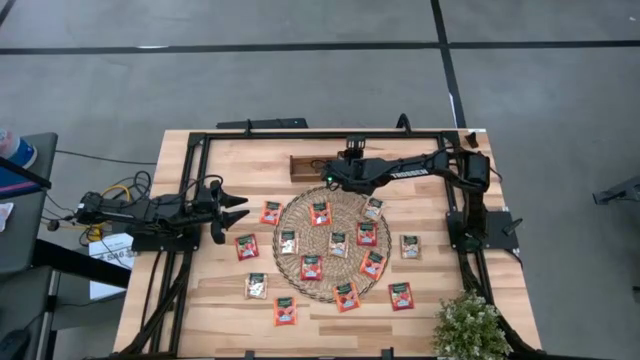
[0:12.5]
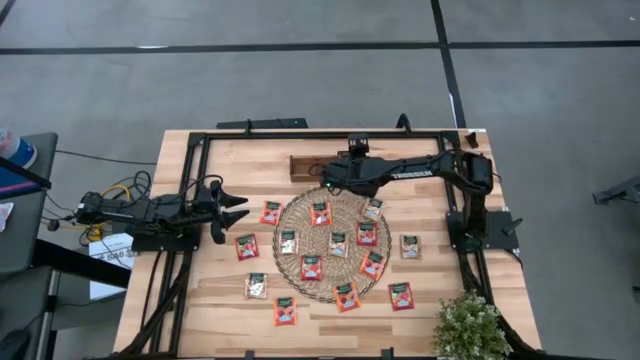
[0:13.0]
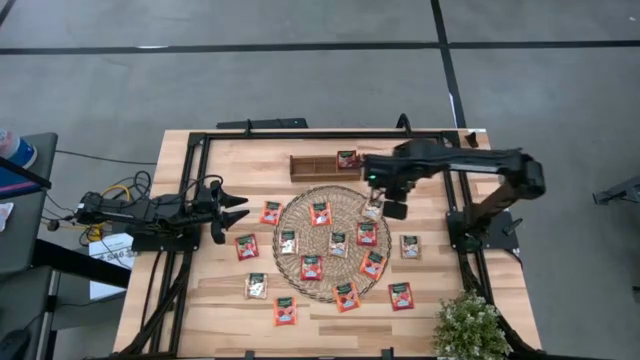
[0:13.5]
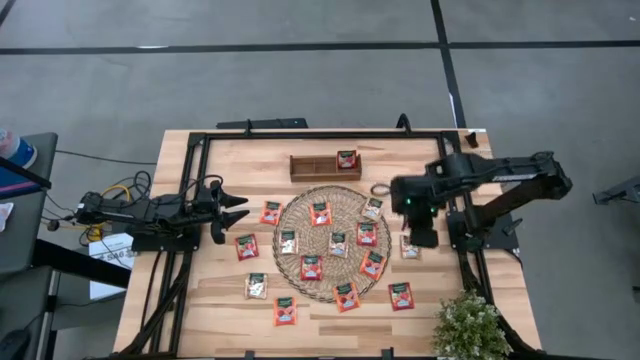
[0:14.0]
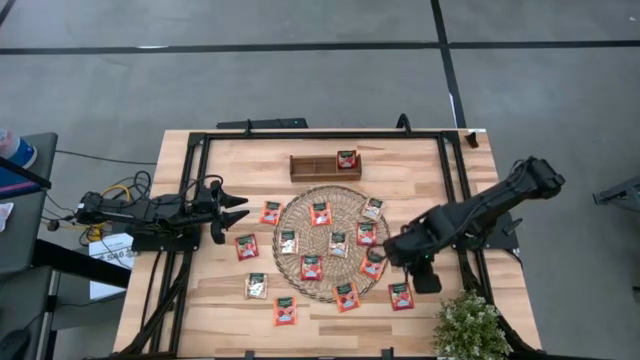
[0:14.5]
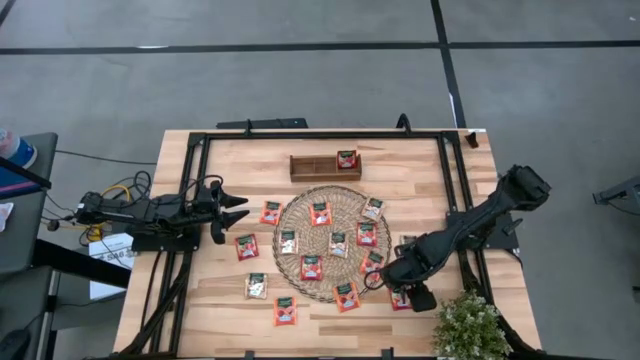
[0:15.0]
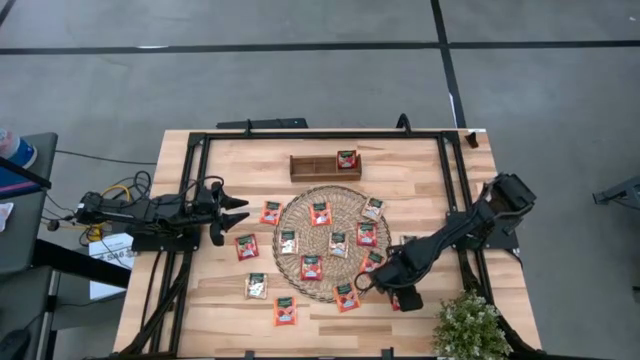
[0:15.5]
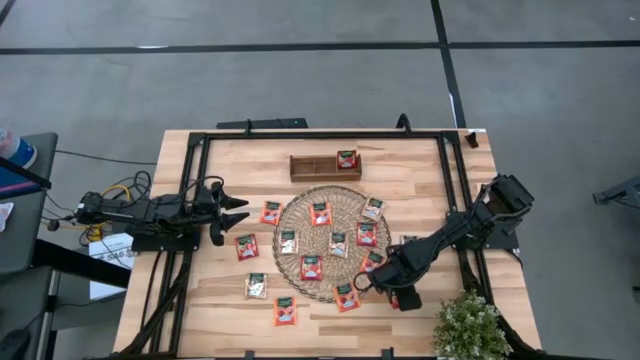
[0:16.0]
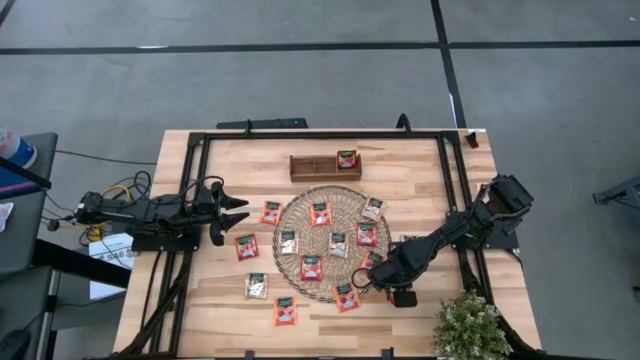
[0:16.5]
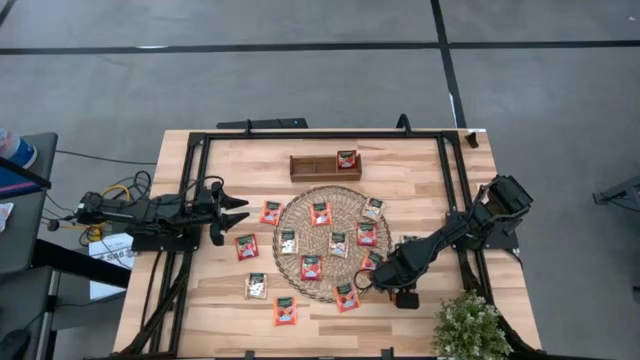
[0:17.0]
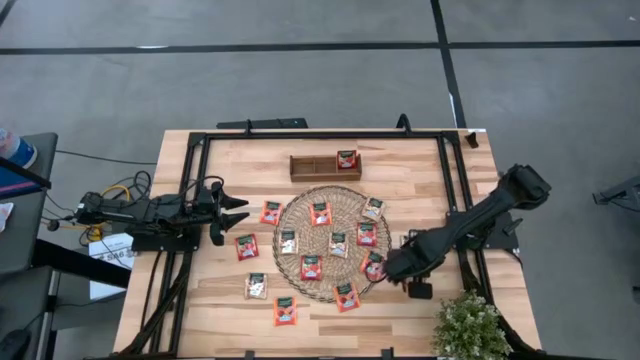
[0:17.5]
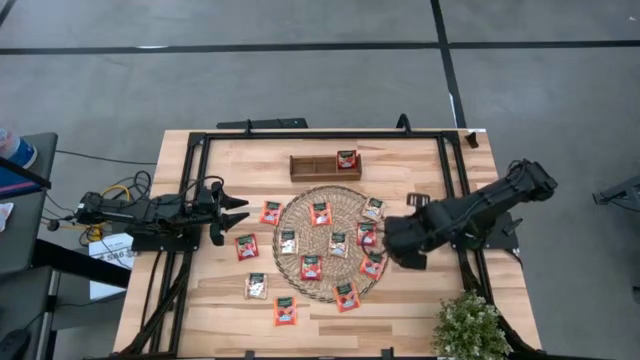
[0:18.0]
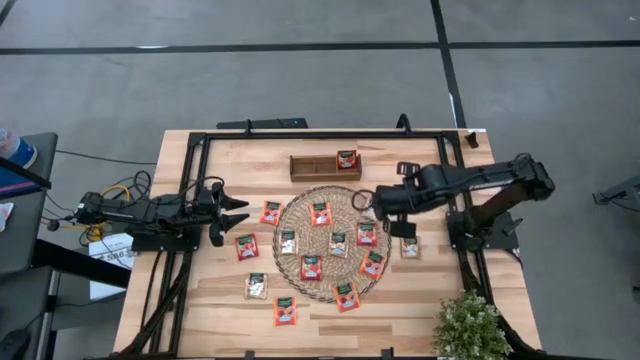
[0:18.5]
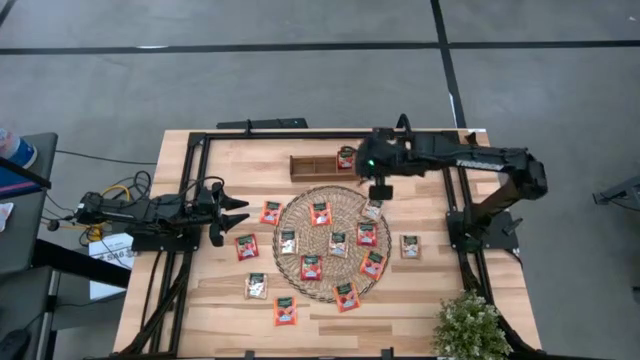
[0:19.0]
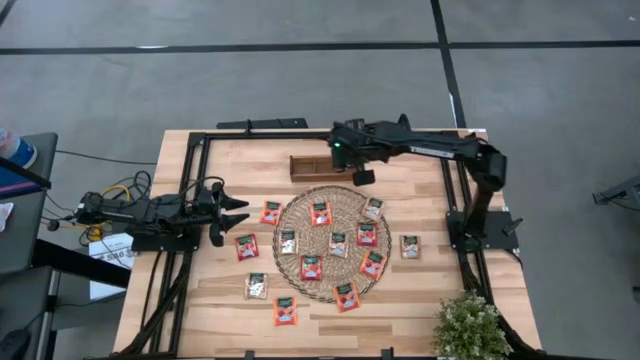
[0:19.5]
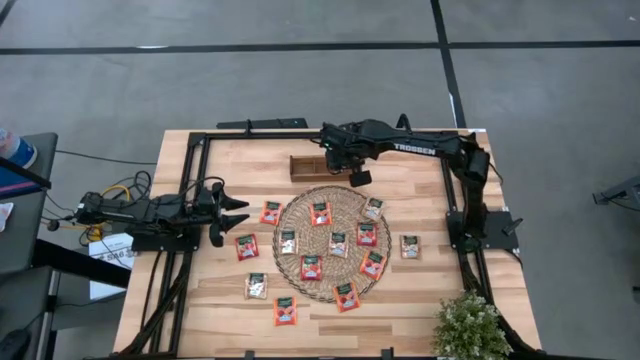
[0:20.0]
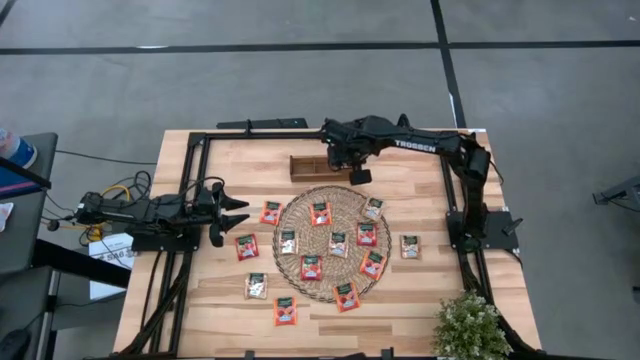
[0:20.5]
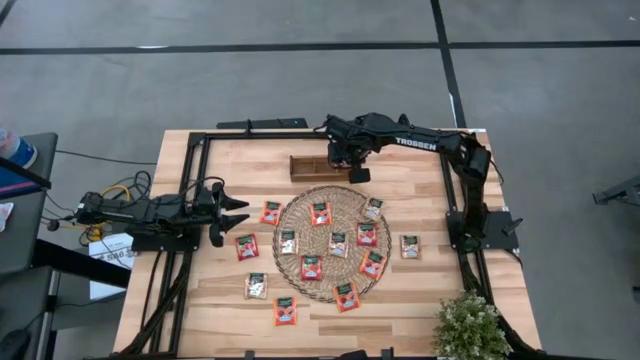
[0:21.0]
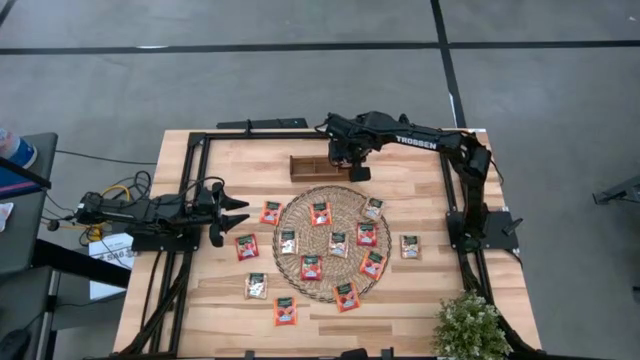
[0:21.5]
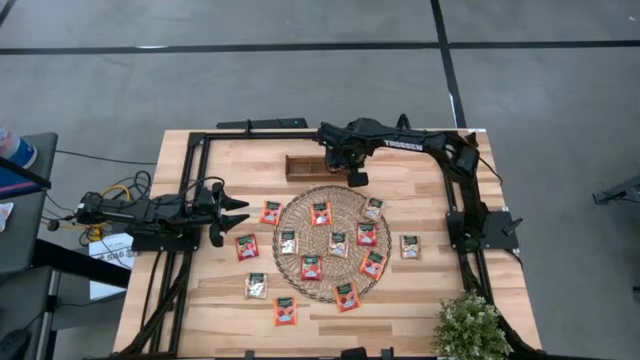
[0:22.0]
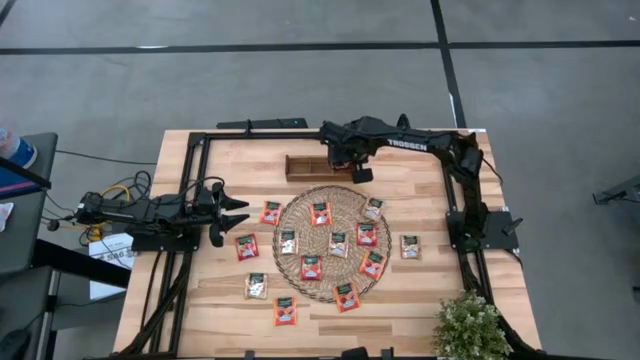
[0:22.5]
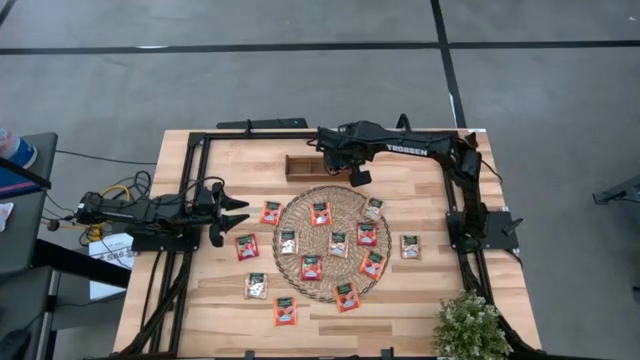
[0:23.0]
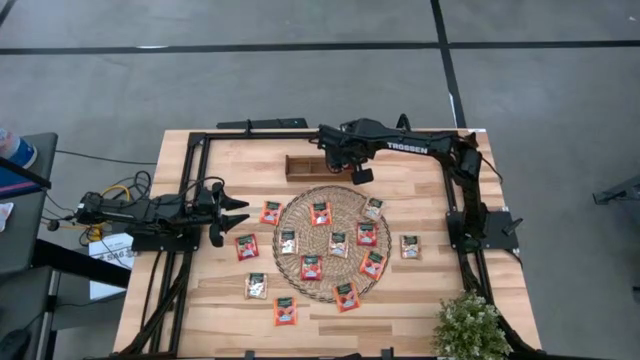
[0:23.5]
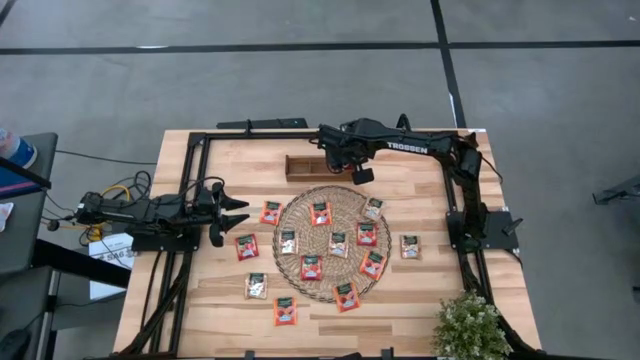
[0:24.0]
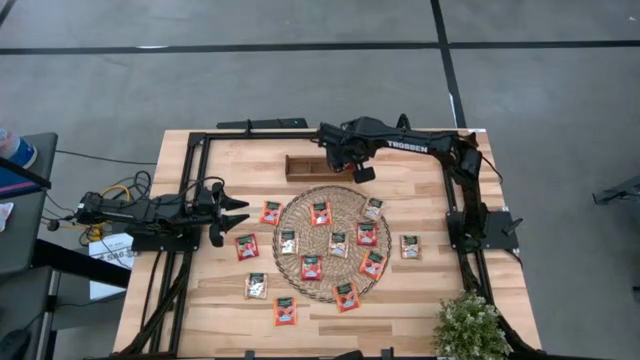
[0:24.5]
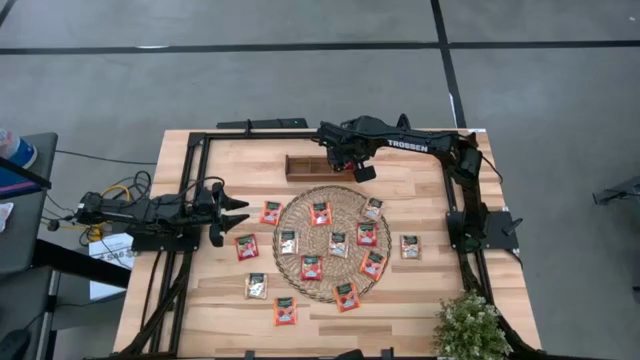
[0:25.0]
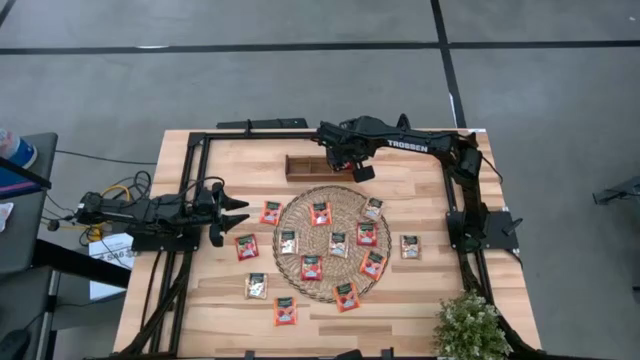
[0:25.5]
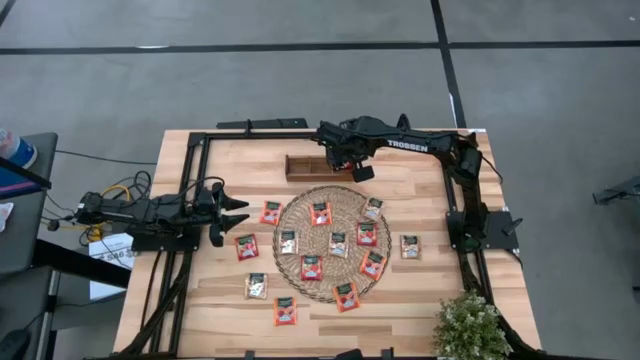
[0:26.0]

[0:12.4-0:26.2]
Task: Pick & Place Tea
Put the red tea bag into the right section of the brown wooden organizer

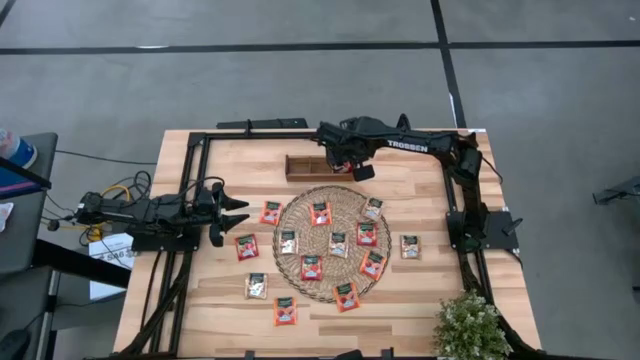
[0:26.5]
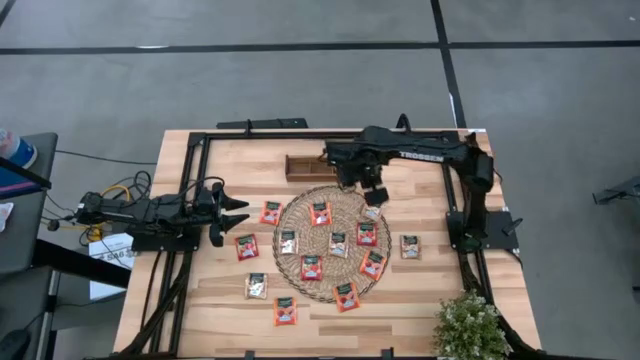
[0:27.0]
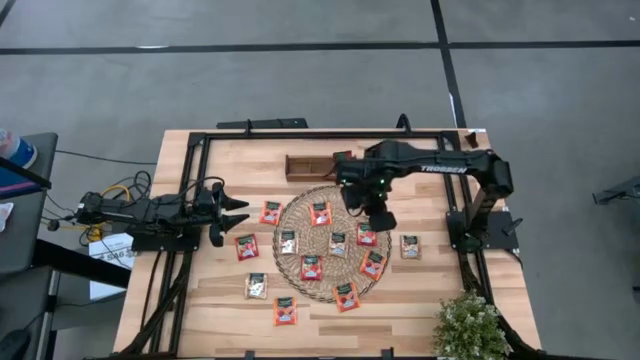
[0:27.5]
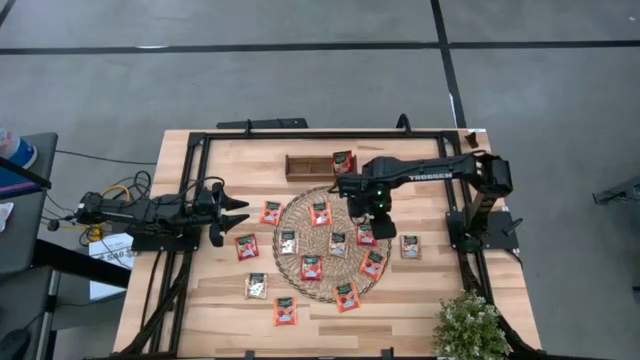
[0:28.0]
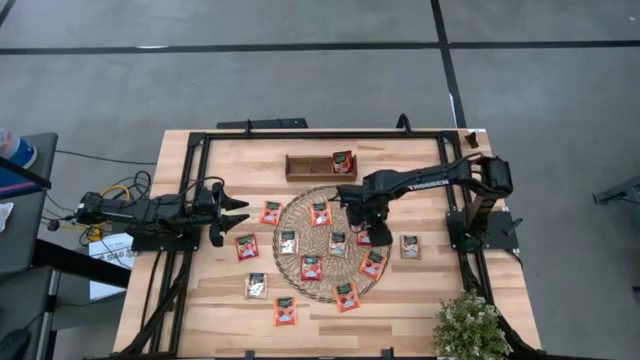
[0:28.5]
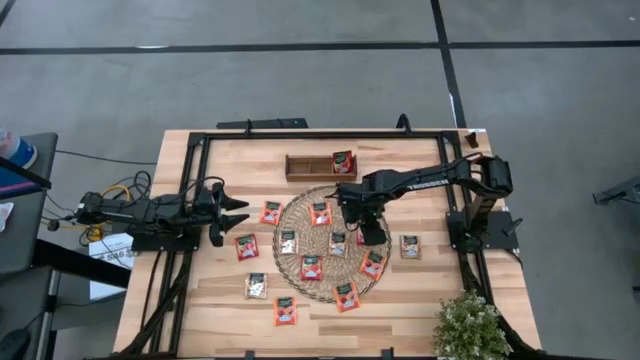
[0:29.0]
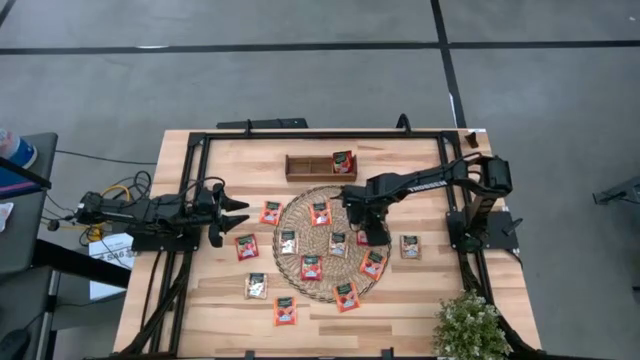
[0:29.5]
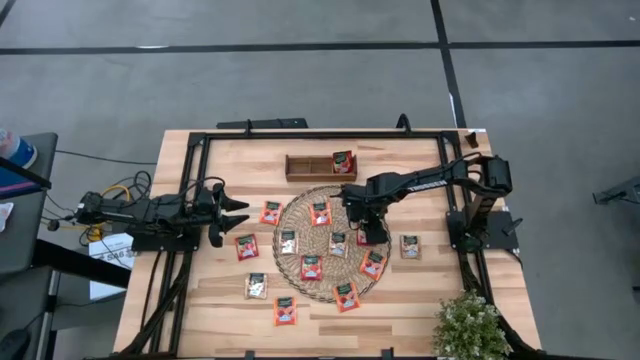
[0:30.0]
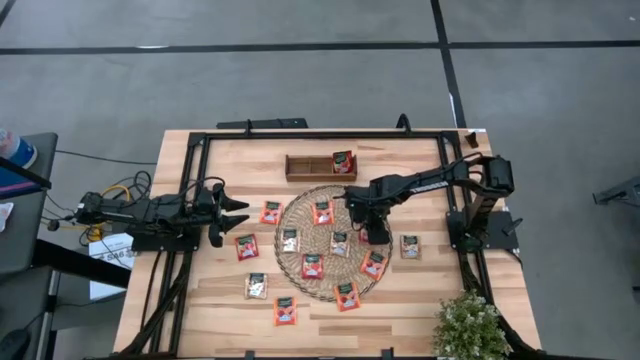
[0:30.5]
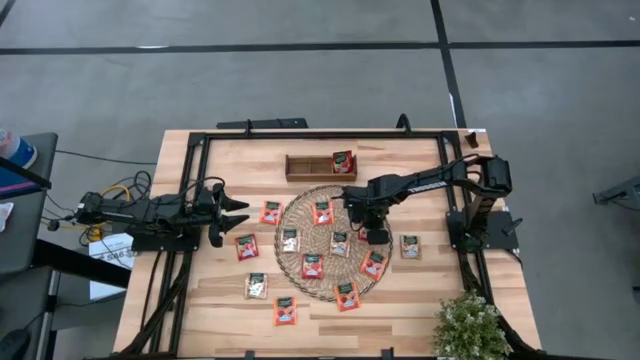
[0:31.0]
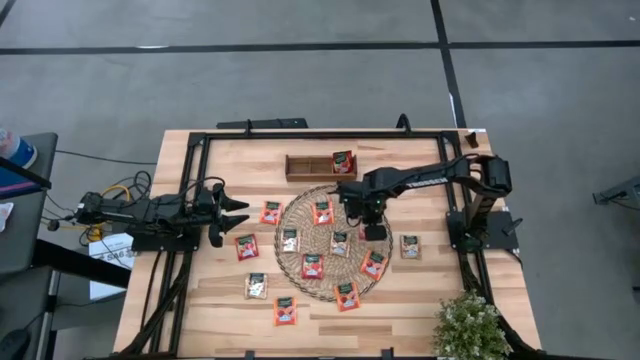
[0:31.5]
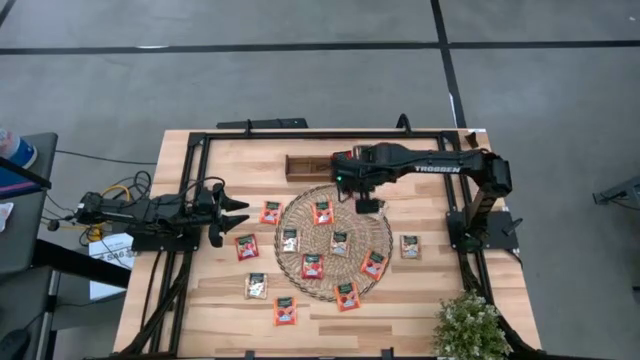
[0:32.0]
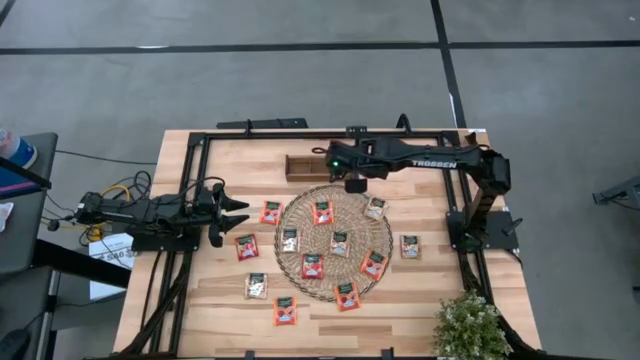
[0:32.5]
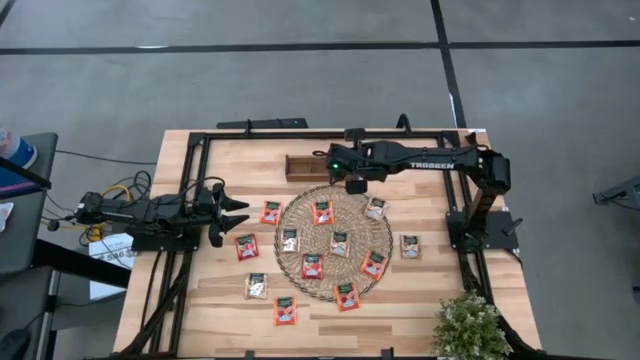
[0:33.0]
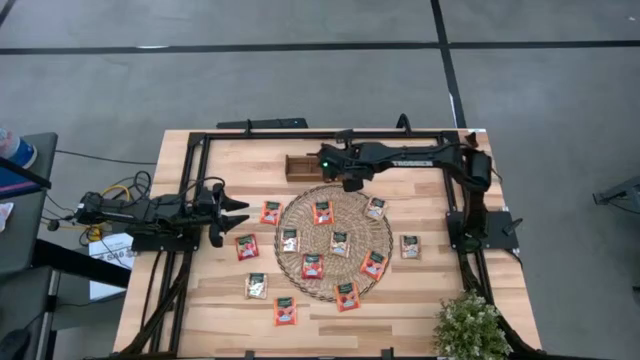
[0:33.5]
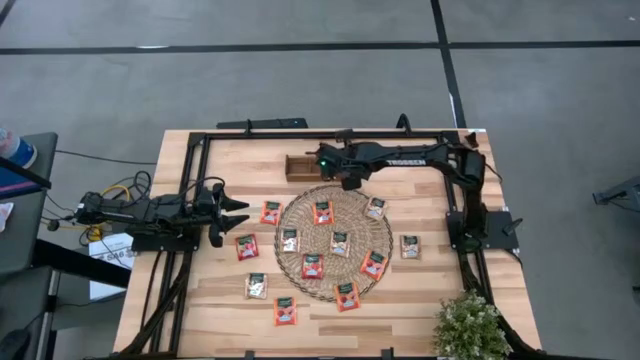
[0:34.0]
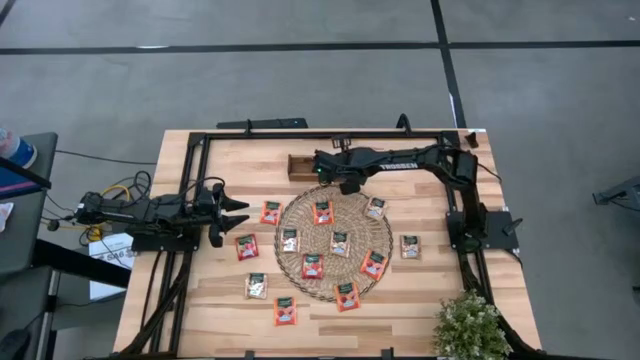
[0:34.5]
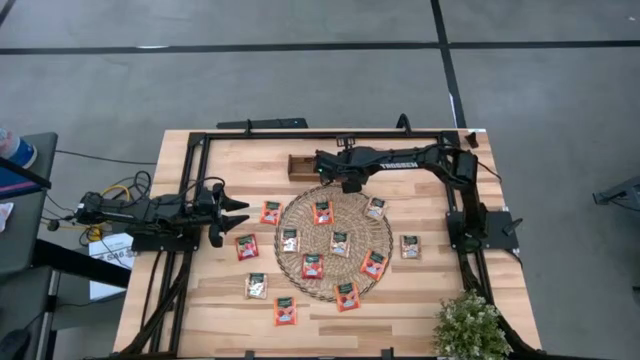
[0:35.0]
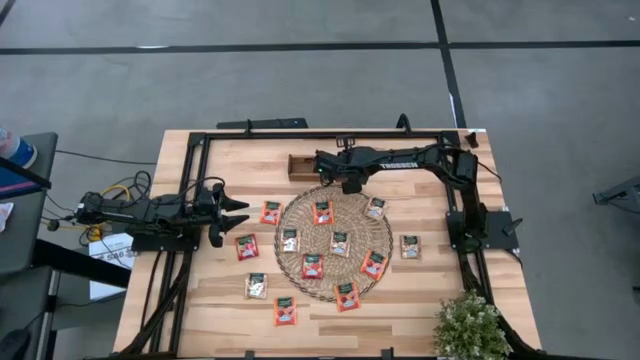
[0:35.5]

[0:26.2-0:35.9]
Put the red tea bag into the right section of the brown wooden organizer
